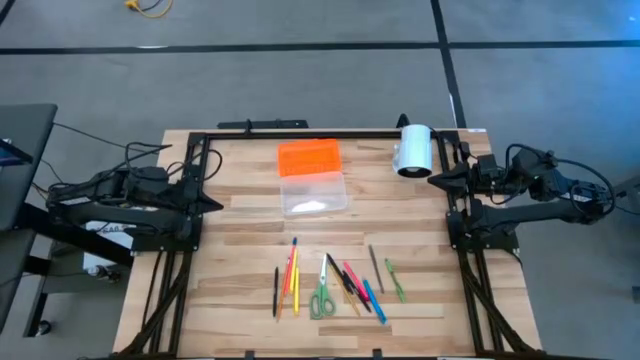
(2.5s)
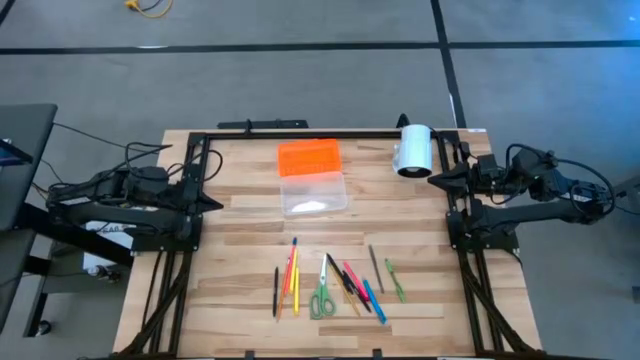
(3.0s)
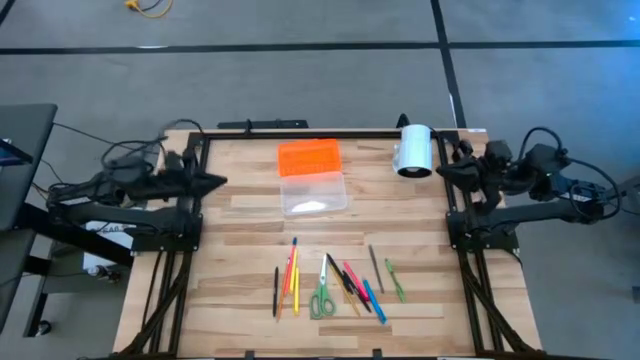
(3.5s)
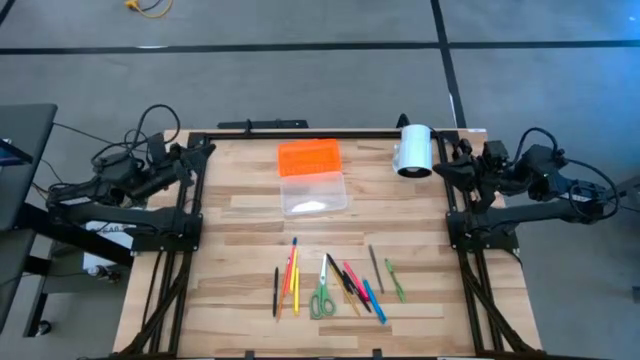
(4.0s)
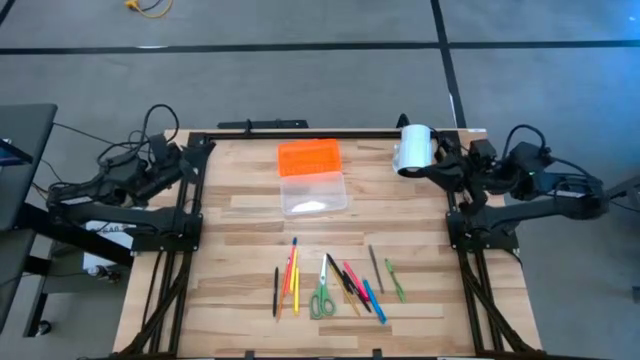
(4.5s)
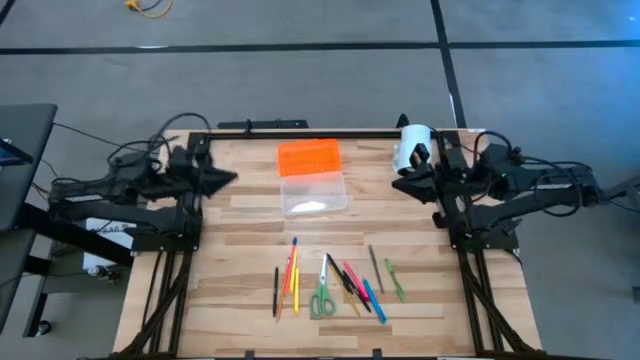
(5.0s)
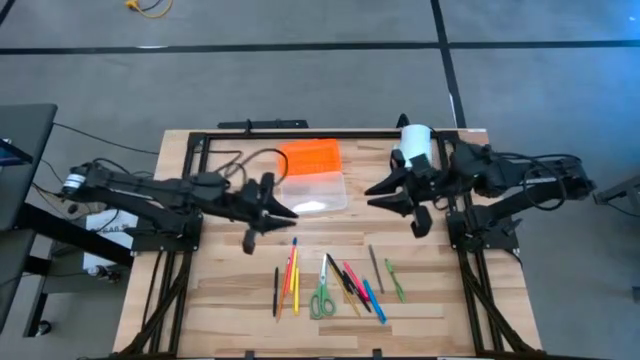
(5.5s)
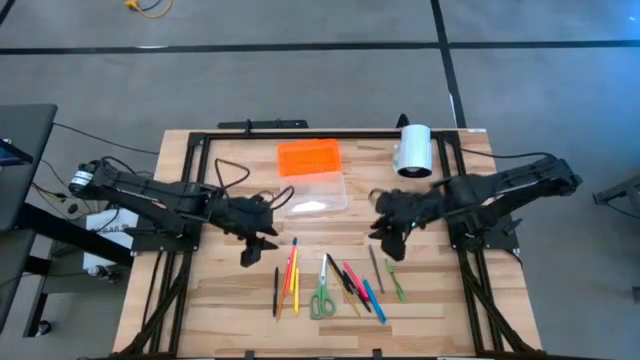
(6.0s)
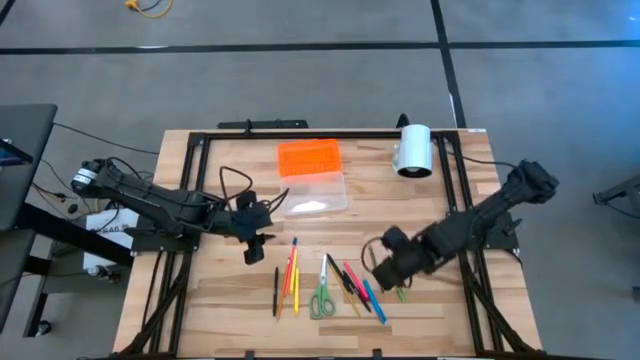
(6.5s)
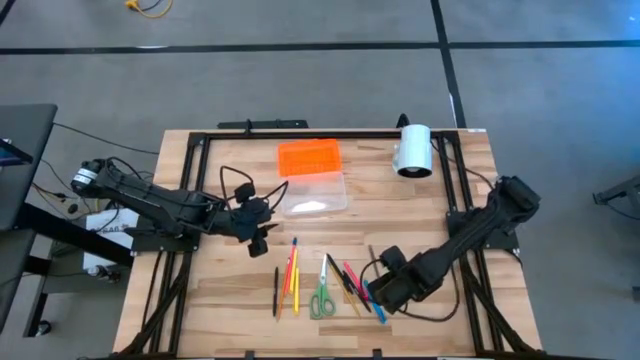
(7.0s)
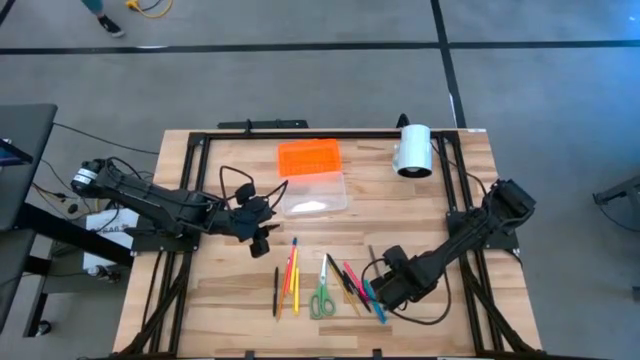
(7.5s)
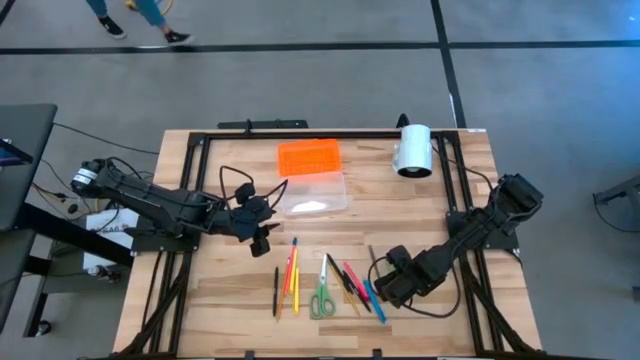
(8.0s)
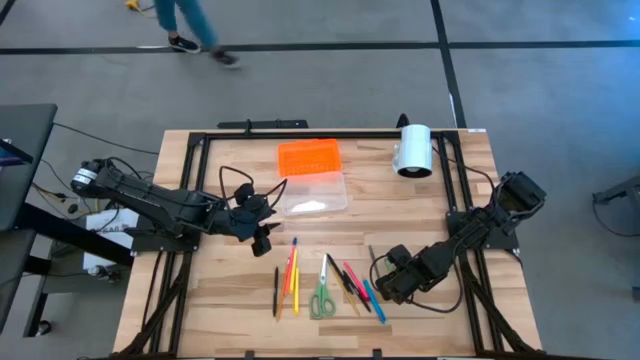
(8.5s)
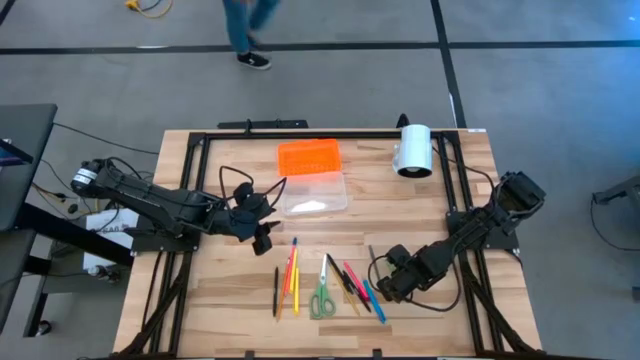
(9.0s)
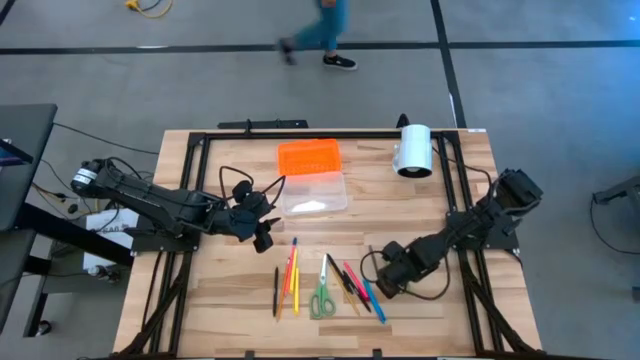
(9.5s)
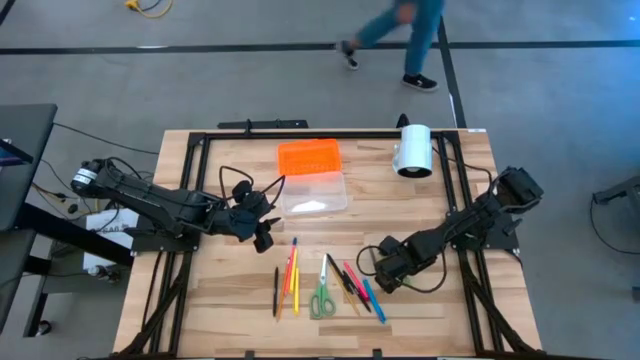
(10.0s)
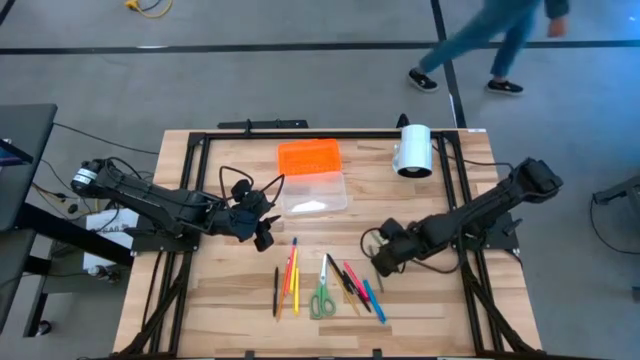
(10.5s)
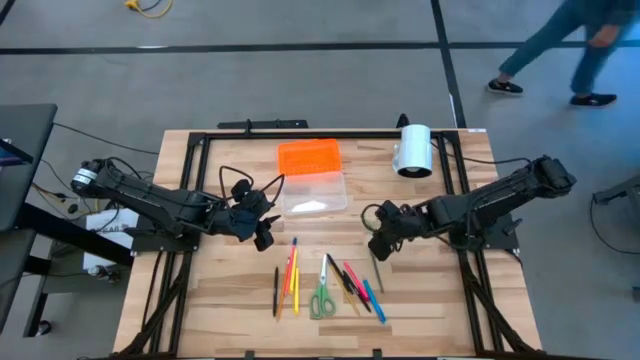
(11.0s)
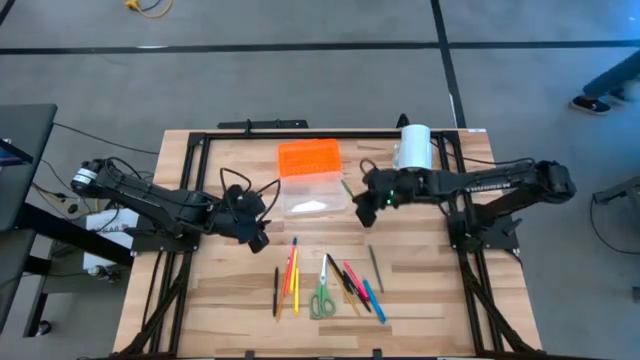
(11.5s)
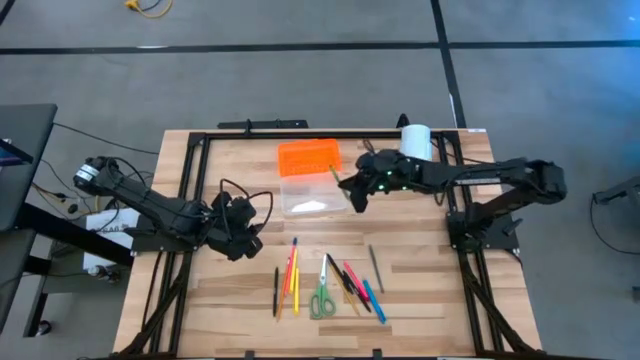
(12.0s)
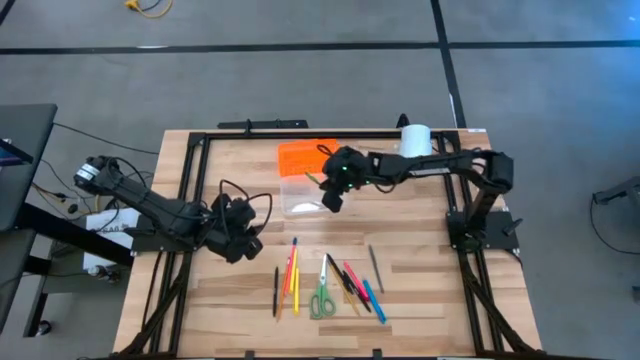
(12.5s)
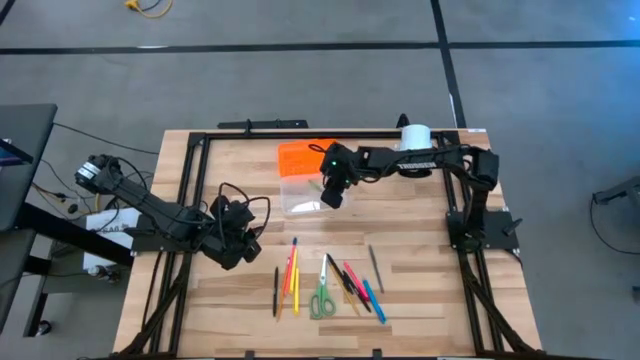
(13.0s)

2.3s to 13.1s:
Task: Pick & place school supplies into a supply box
Put the green pen into the supply box

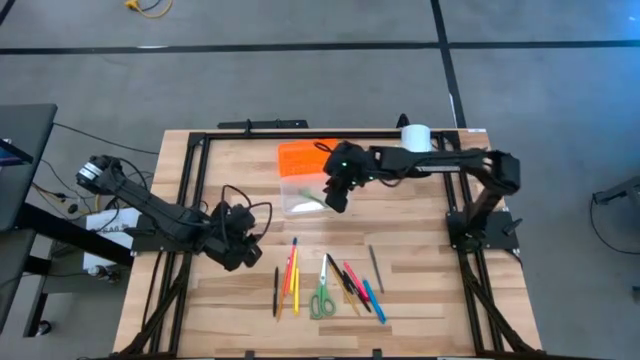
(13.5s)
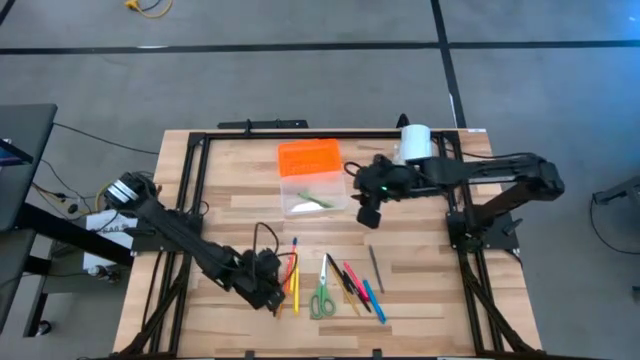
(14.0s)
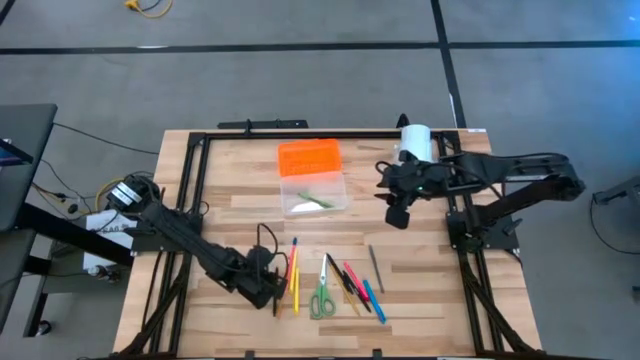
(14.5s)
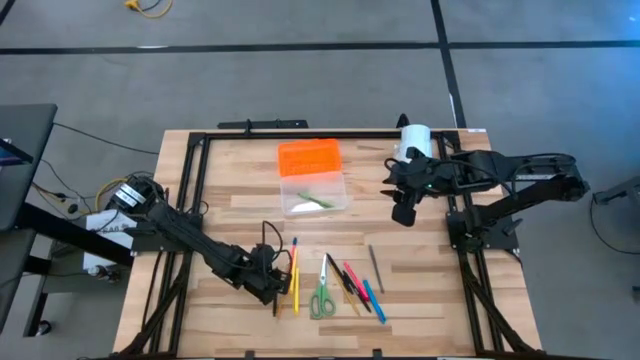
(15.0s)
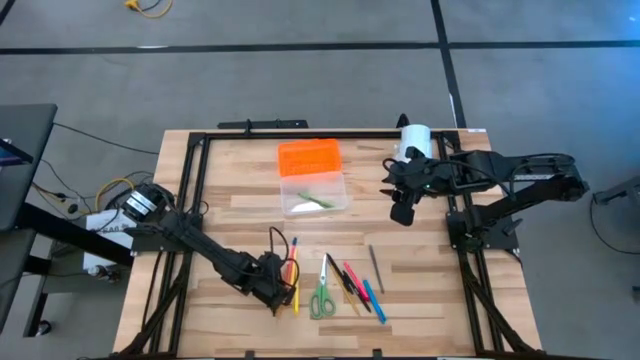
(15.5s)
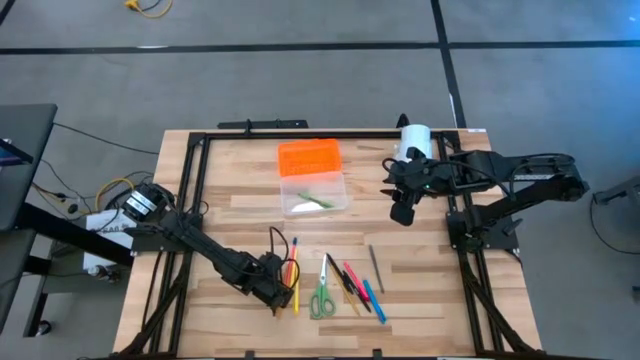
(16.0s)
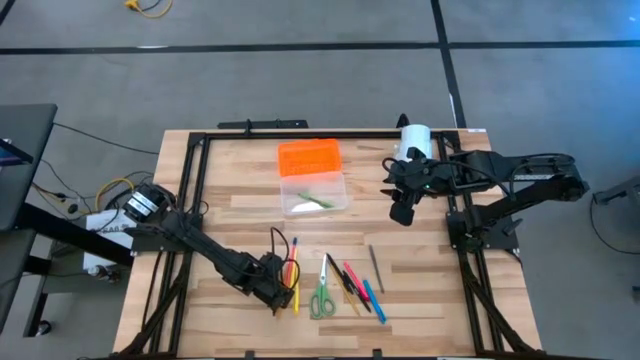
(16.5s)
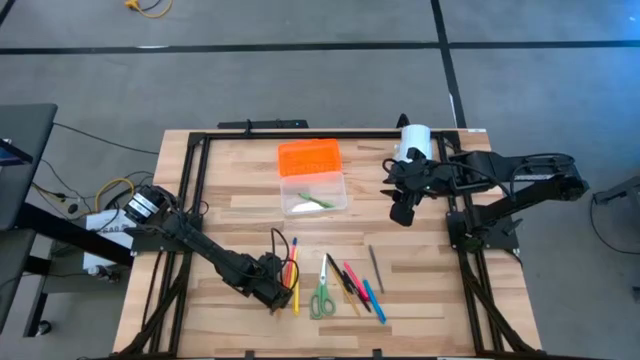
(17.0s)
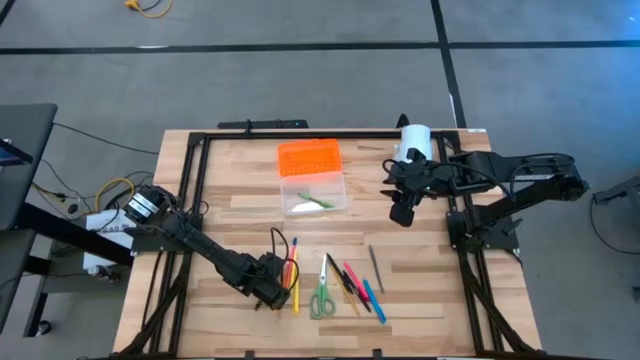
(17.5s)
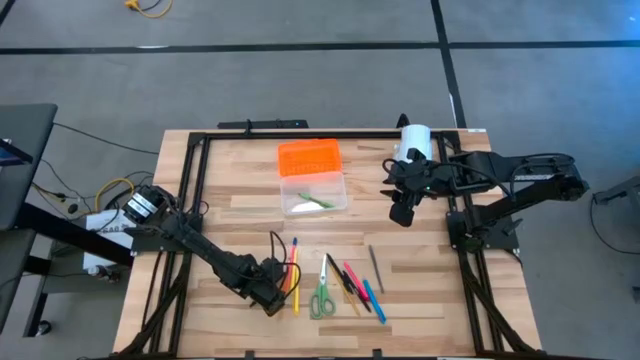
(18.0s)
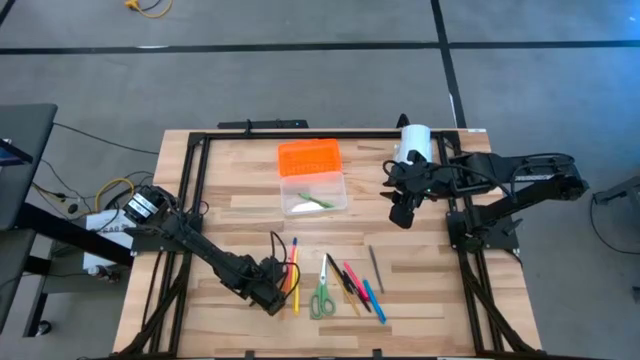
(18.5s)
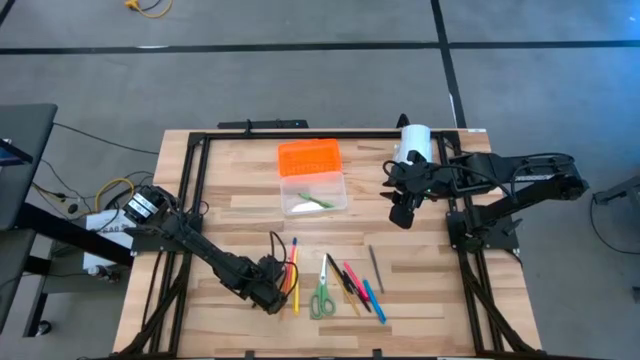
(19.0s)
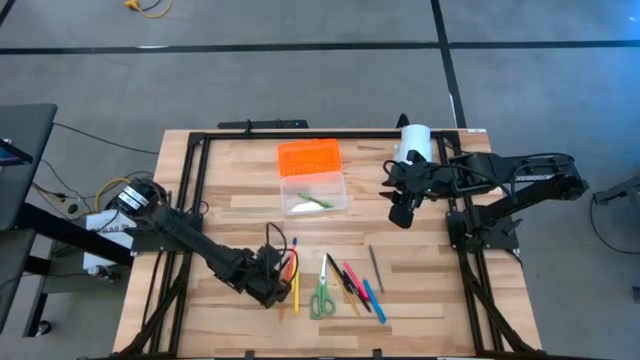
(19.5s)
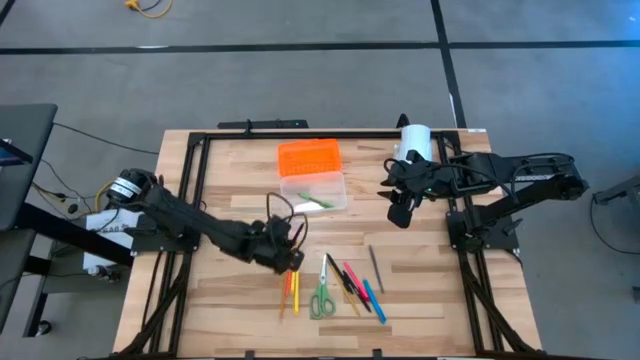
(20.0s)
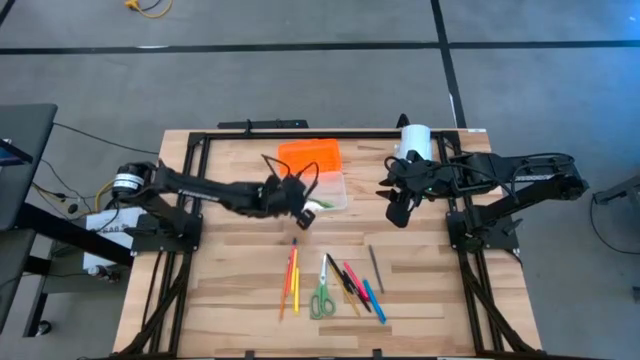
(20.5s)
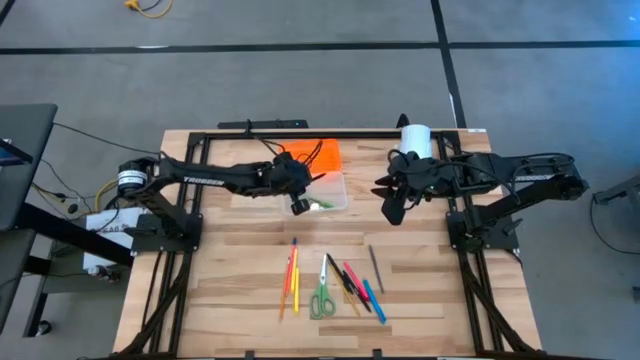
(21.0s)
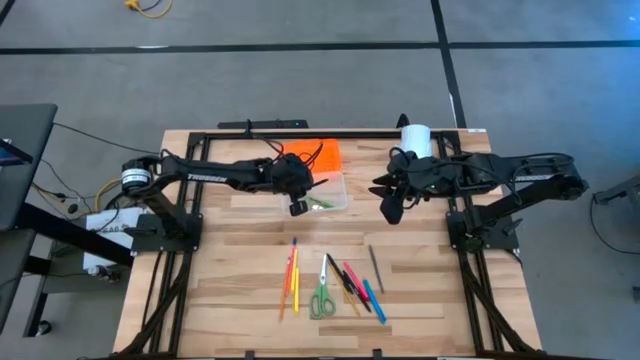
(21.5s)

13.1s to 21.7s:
Put the left black pen into the supply box

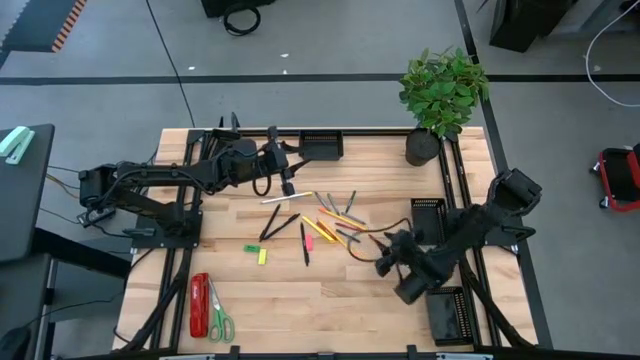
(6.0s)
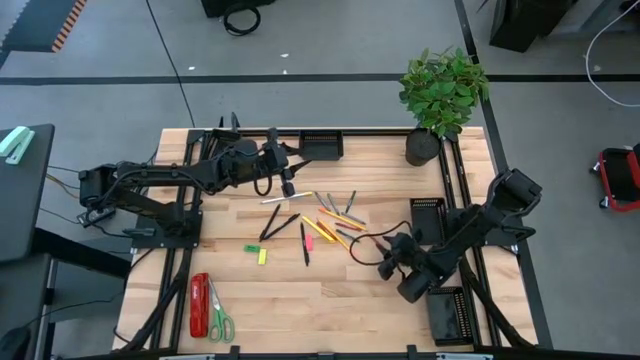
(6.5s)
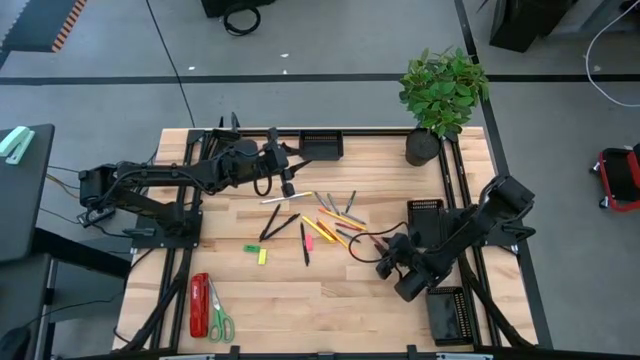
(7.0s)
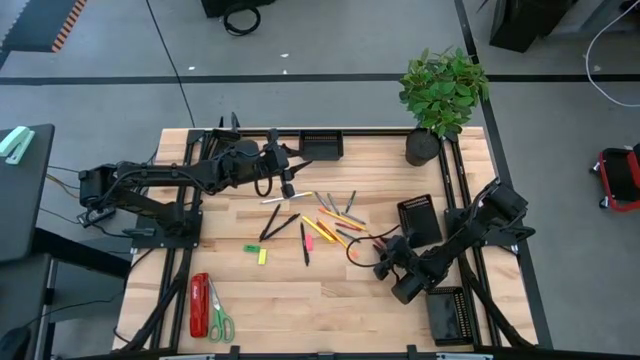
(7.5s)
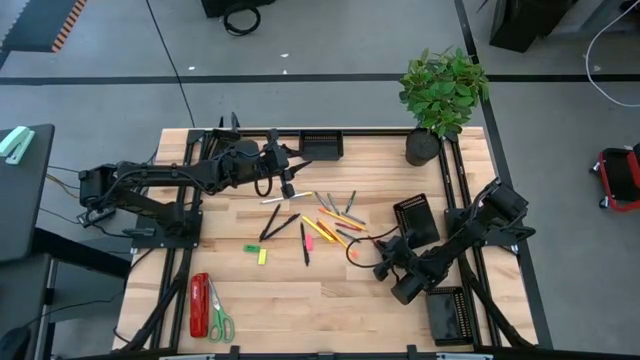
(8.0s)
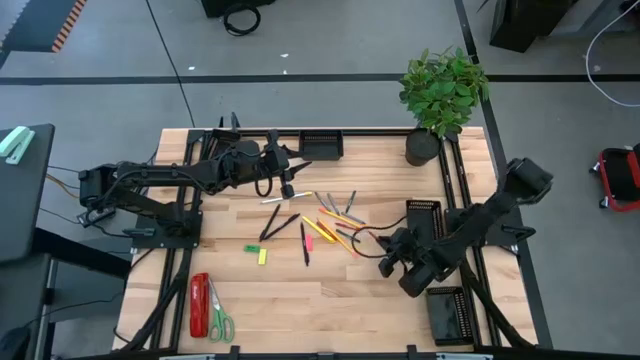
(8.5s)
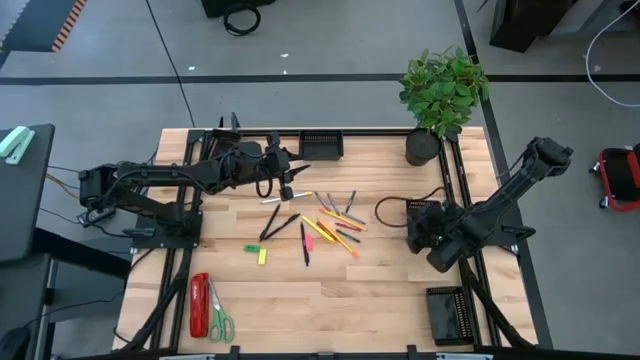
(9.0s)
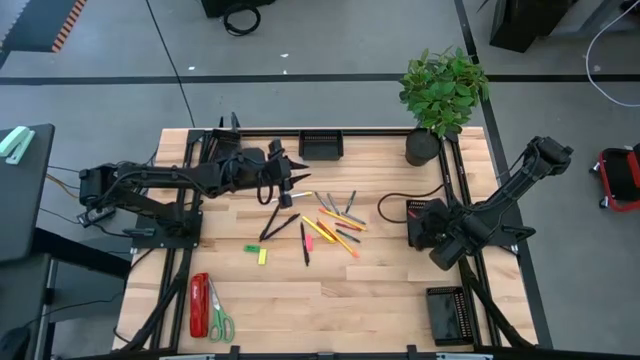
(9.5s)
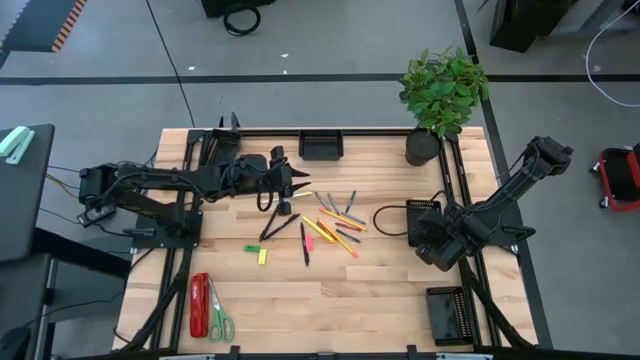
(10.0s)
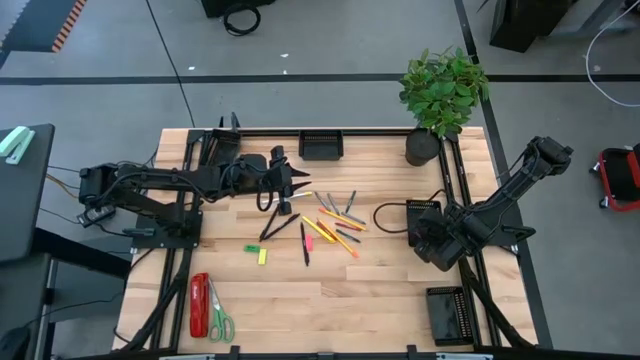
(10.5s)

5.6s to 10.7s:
Task: Sort crayons/erasers/pens/pencils in bins
Put the red crayon into the middle right black bin
